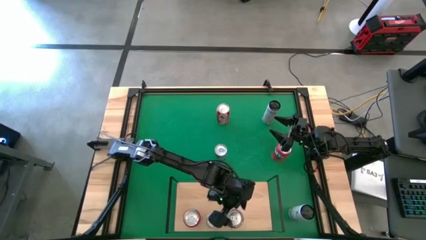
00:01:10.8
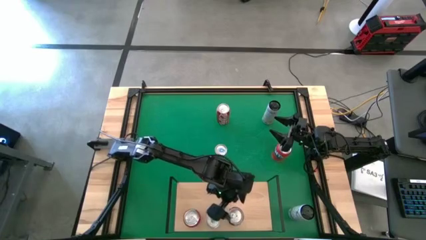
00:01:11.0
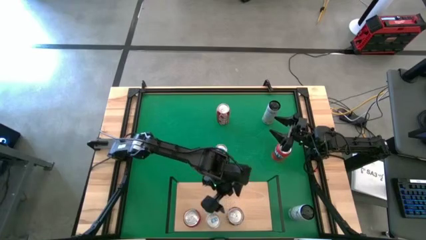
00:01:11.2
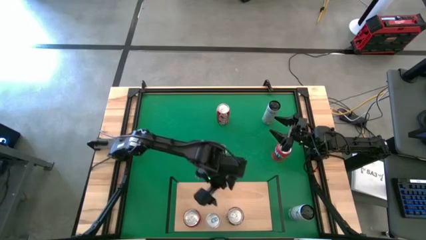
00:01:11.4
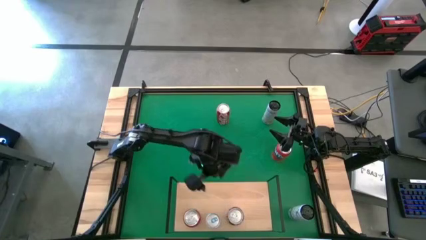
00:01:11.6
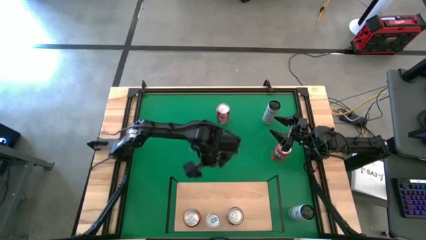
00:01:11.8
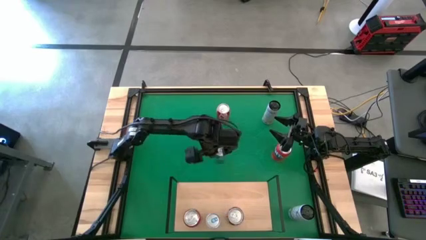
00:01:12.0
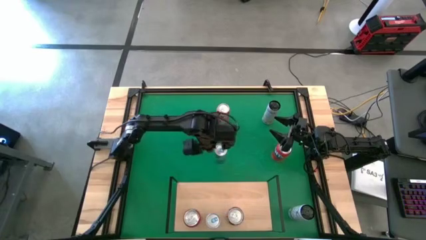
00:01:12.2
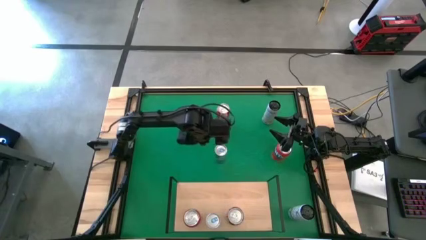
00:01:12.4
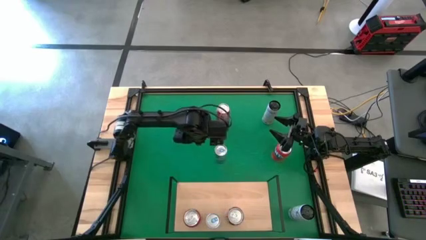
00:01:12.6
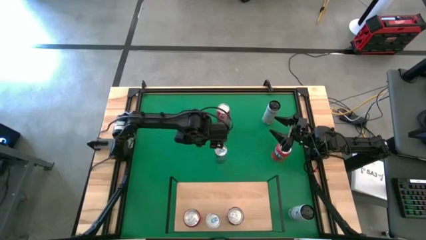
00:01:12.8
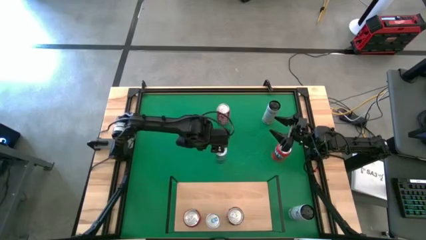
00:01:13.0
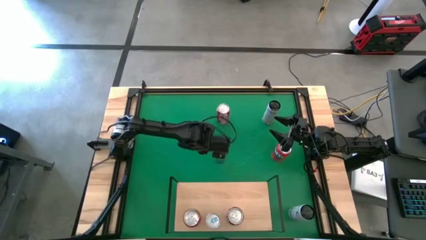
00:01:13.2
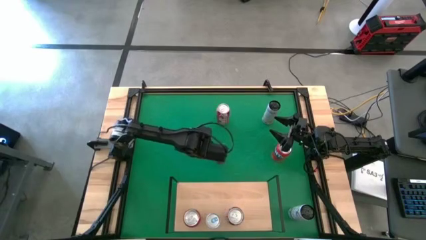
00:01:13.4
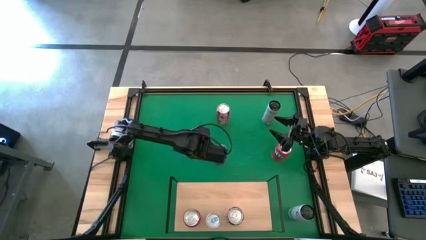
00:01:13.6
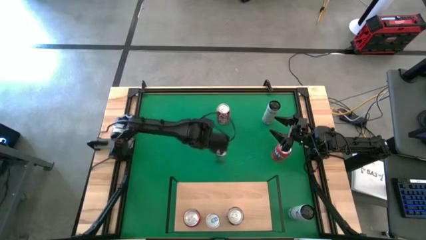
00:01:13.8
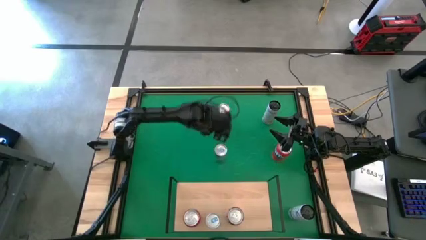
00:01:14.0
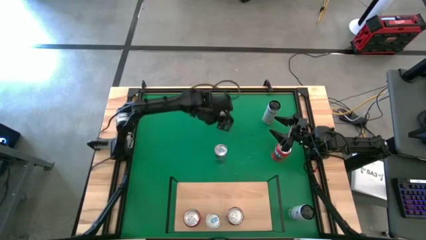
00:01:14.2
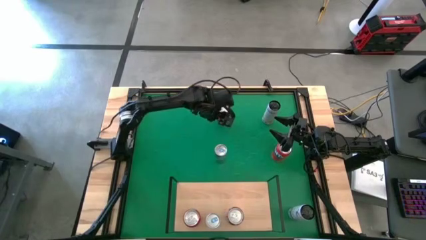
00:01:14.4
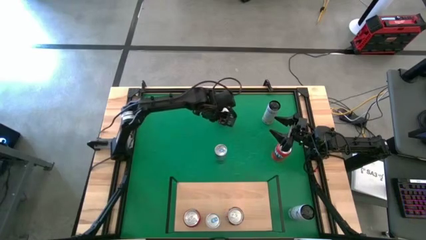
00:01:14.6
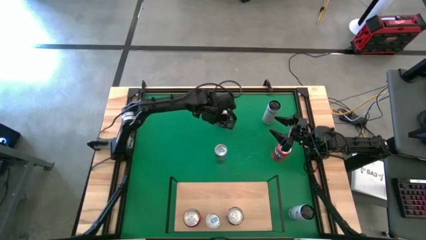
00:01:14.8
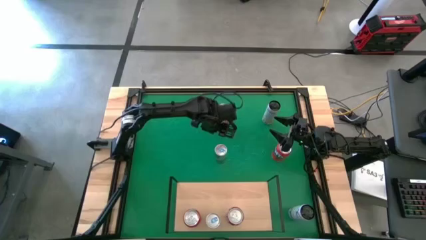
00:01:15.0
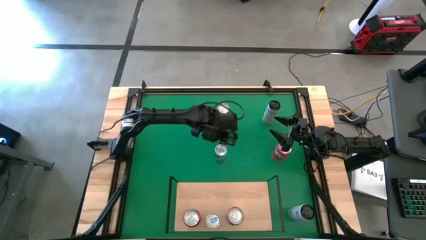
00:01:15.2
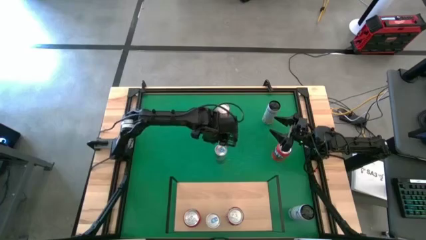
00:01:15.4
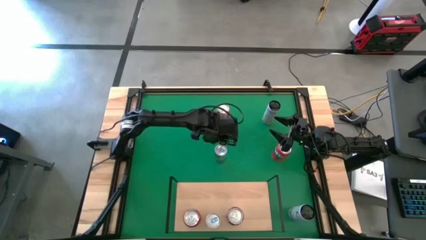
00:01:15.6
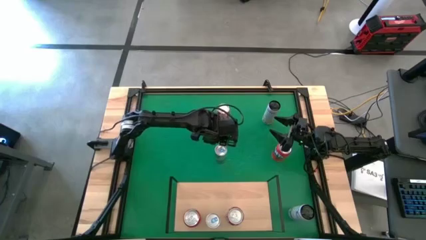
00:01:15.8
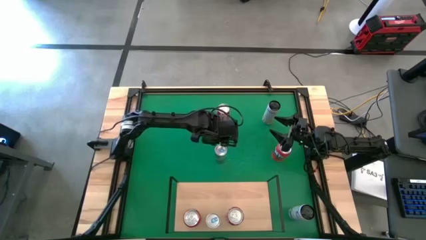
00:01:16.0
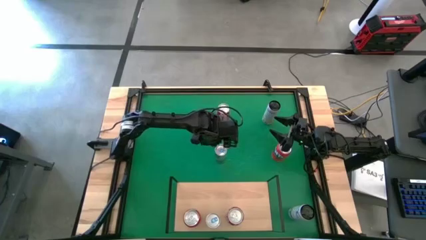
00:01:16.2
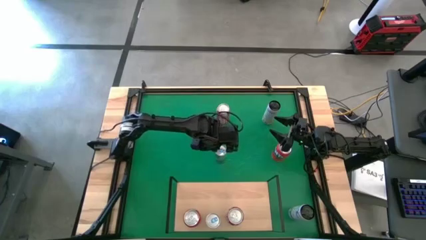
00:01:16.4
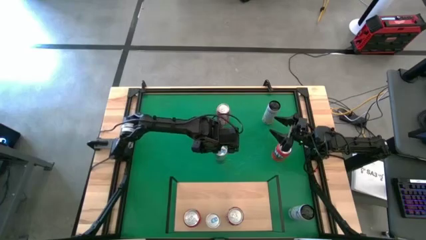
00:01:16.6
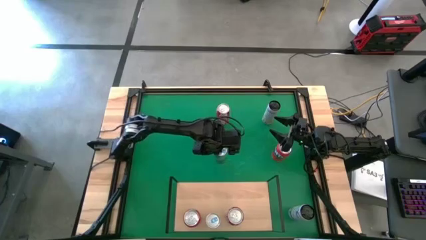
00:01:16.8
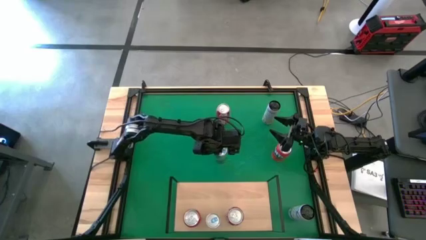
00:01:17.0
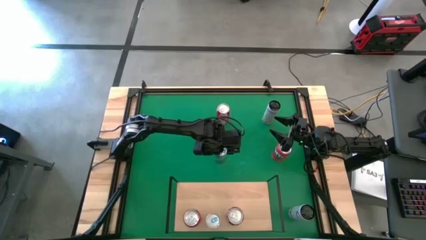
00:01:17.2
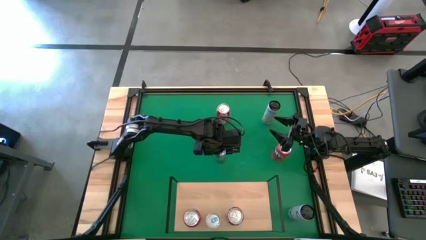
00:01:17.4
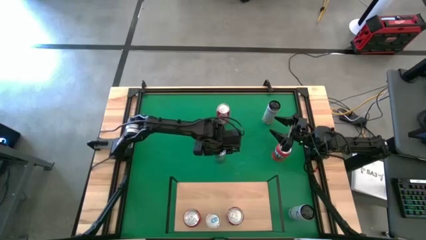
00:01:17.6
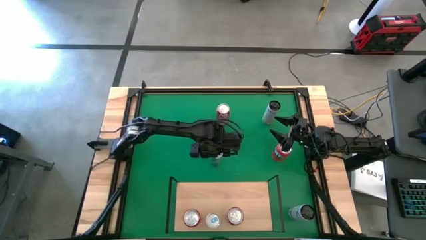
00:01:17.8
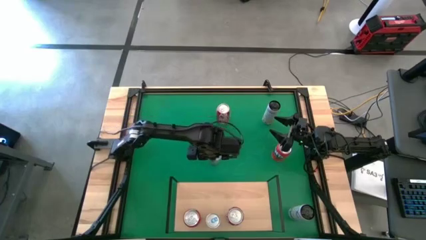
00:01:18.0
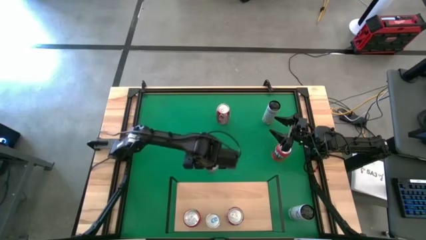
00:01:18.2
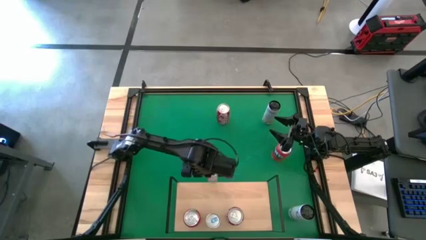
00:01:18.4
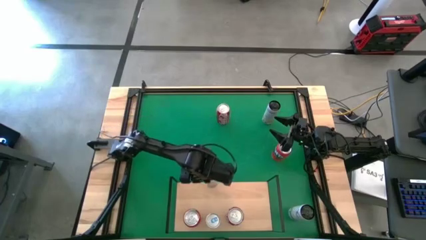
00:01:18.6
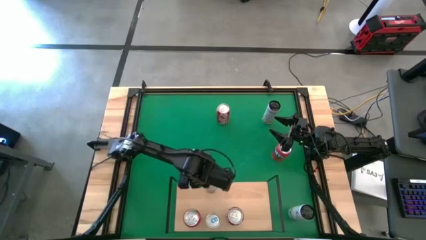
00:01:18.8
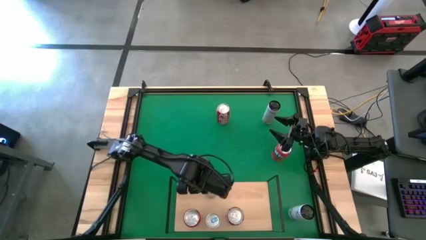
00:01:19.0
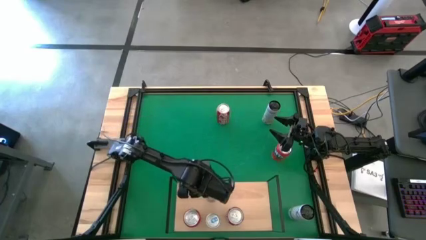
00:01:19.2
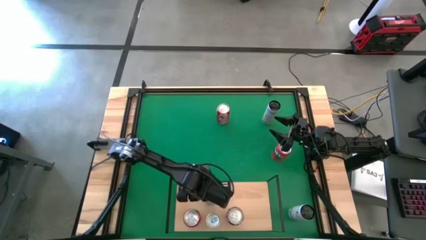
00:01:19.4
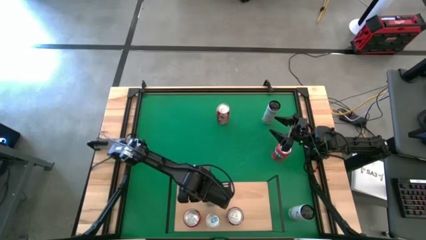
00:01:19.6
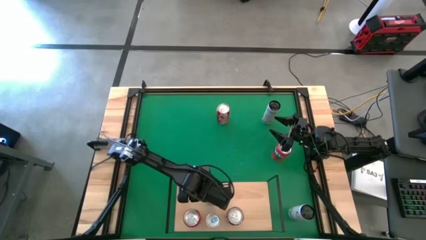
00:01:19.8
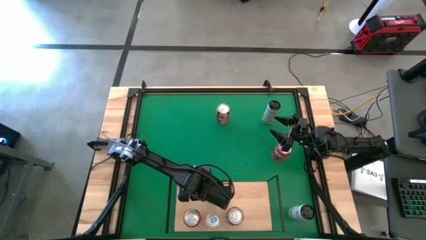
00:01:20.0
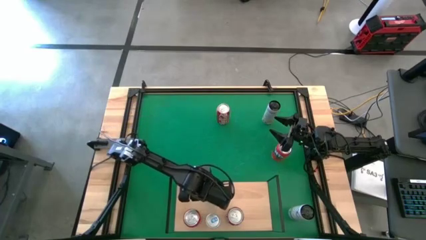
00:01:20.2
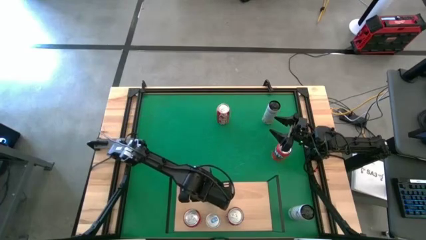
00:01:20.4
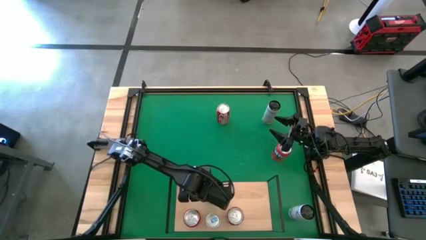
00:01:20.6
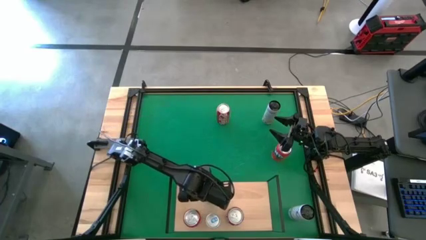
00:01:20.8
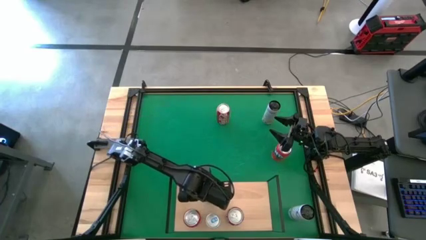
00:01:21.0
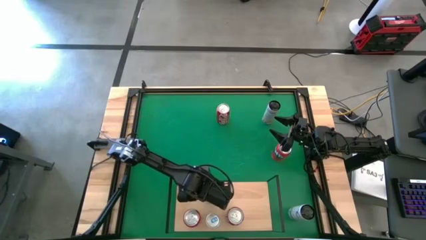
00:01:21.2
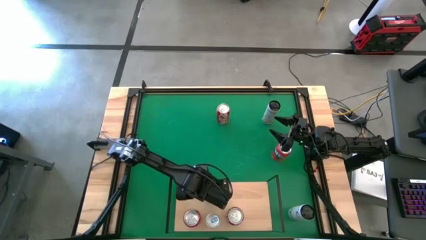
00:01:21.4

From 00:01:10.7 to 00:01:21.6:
Task: Place canned beverage on shelf
Put the blue soda can on the shelf
